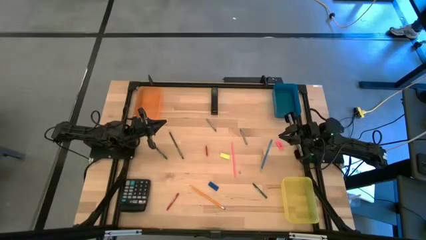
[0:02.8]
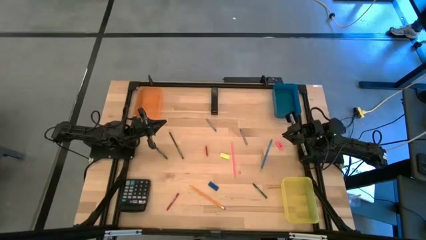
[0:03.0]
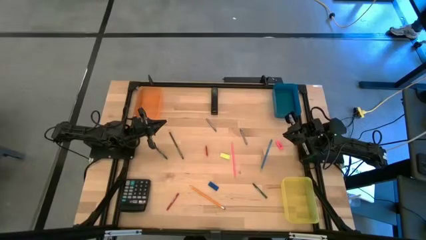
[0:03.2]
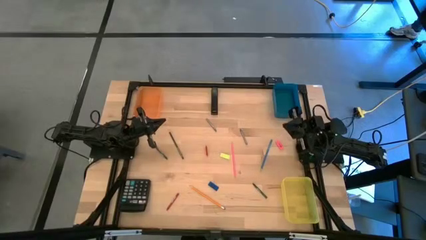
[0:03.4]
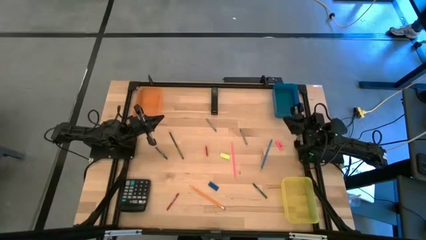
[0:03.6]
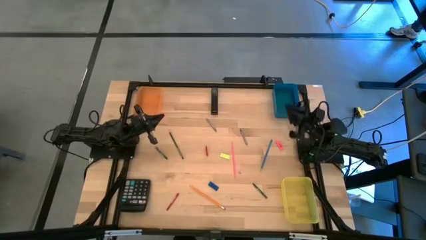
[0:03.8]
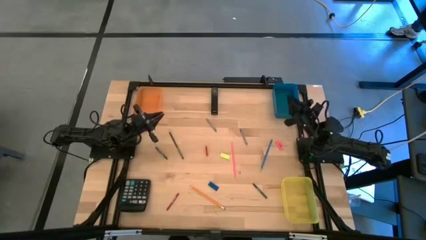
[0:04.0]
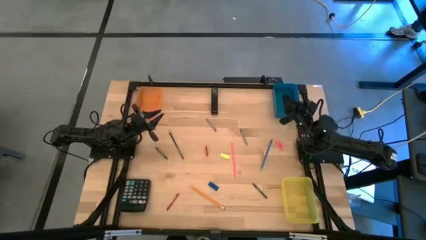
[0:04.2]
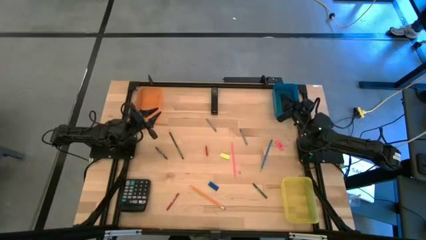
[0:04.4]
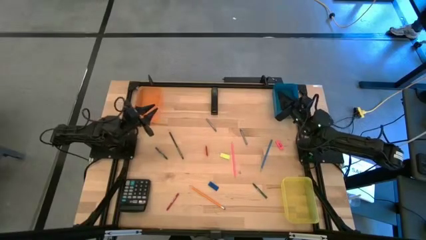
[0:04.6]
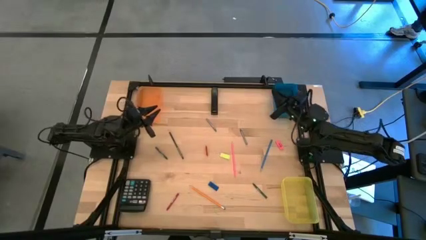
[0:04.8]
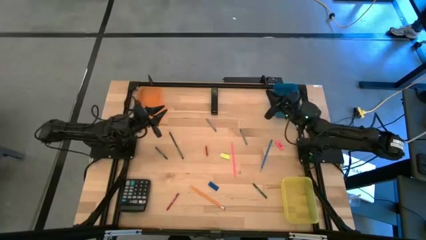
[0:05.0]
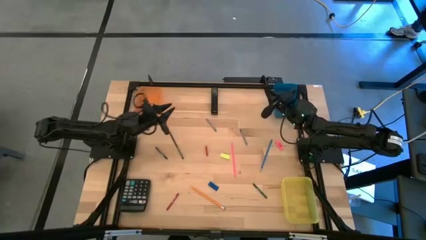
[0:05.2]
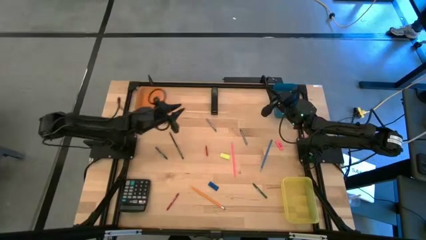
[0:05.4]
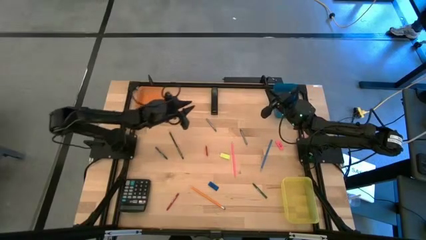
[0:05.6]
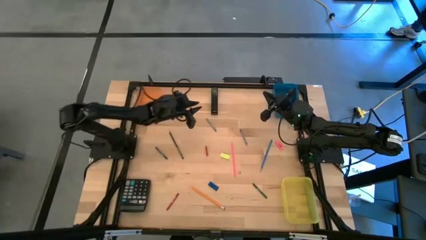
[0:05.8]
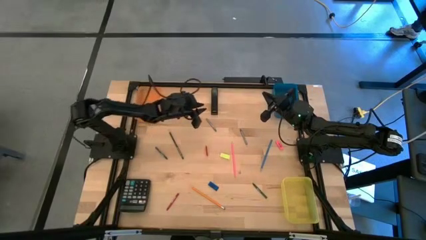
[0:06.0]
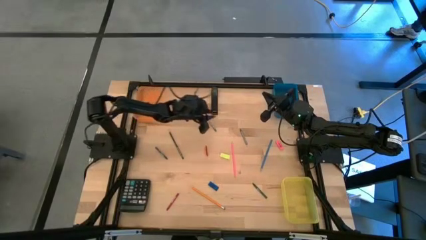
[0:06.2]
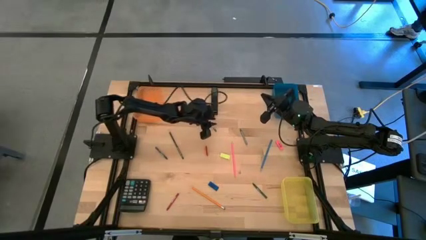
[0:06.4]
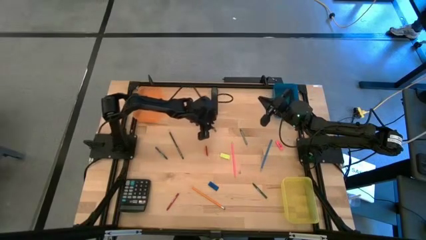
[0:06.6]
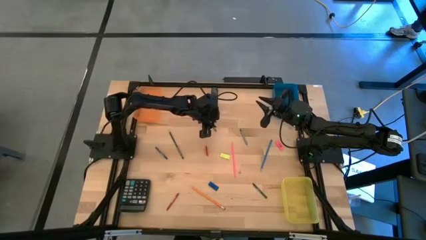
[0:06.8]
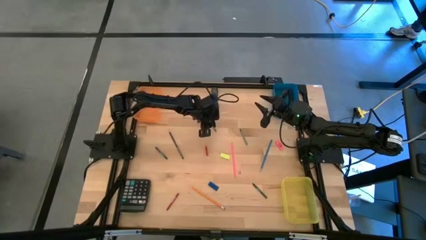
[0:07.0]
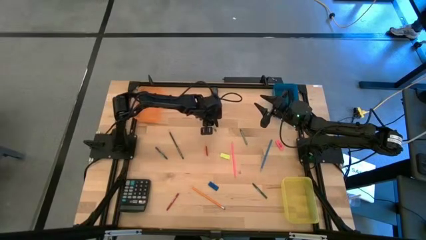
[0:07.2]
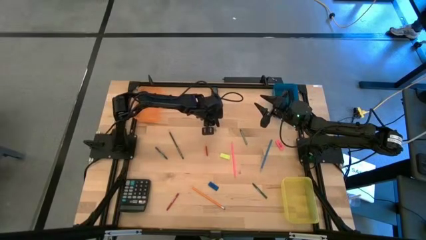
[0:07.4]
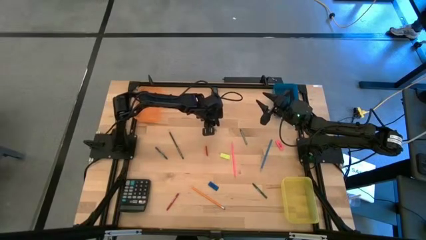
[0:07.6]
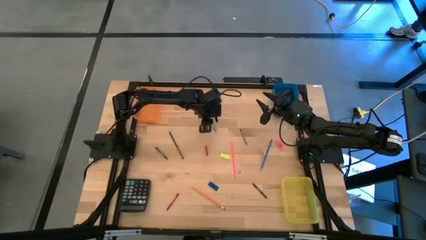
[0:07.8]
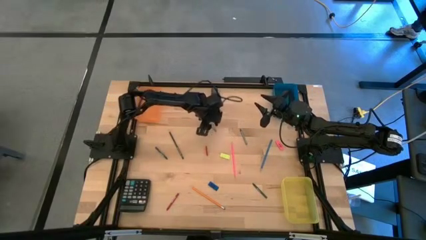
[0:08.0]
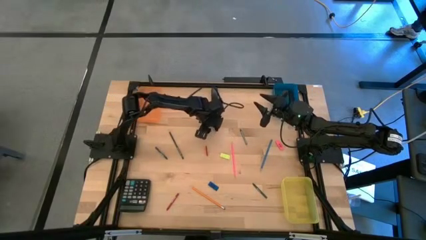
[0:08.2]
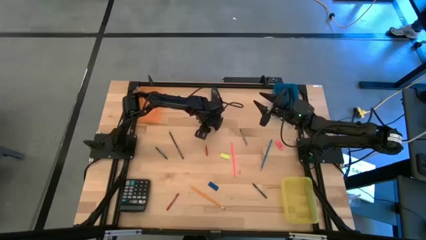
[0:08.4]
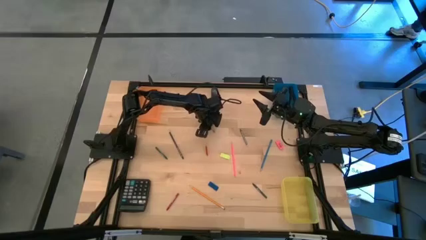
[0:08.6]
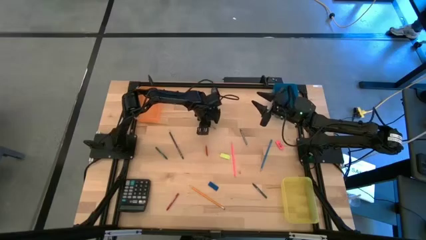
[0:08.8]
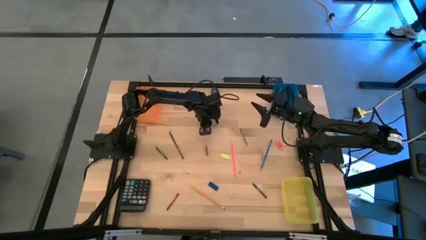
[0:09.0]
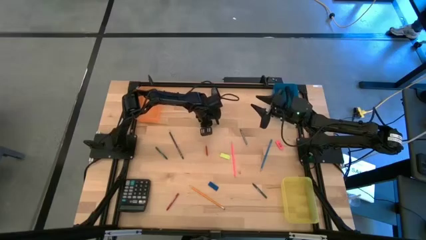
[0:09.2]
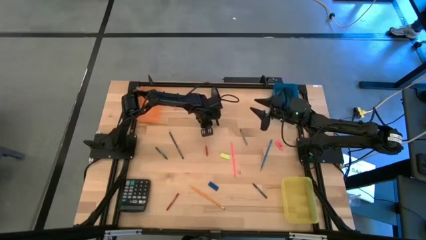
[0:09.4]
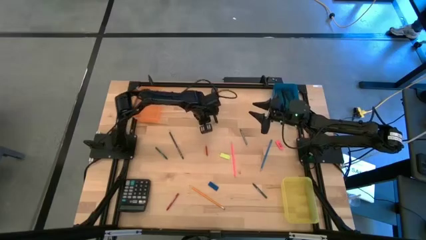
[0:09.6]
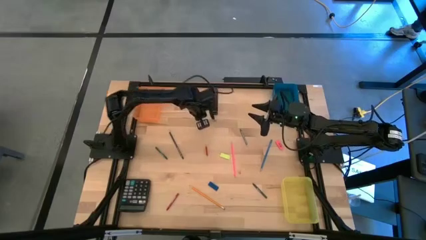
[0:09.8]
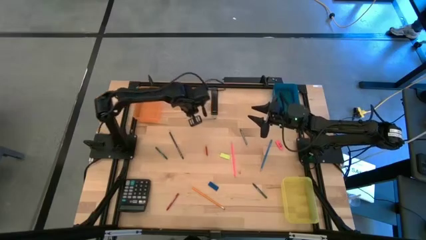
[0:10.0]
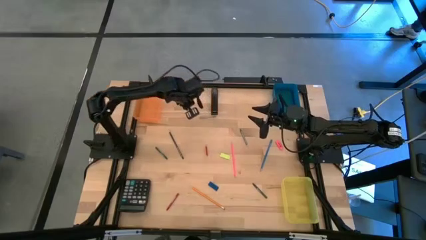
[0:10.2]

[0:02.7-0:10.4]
Task: Sort crayons/erasers/pens/pencils in bins
Put the left gray crayon into the orange bin

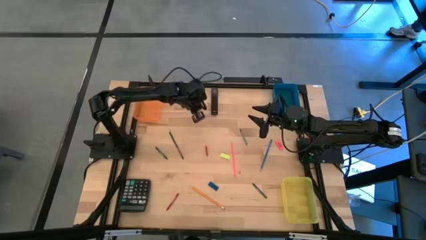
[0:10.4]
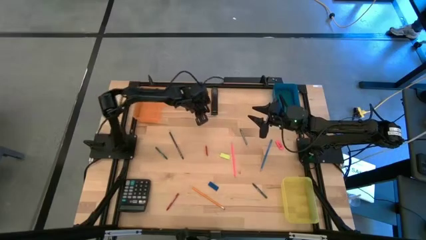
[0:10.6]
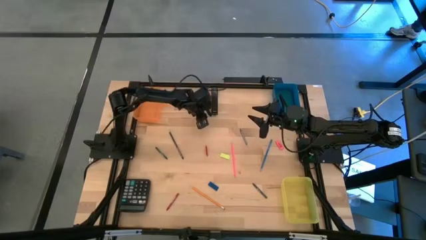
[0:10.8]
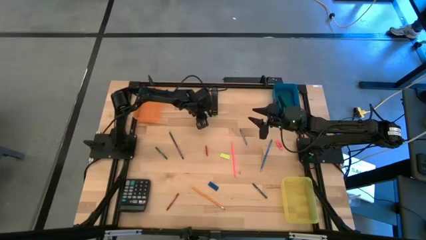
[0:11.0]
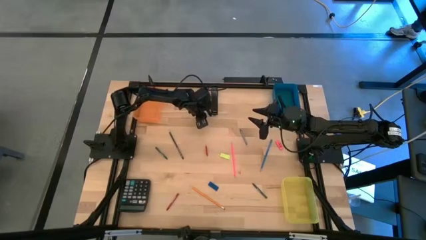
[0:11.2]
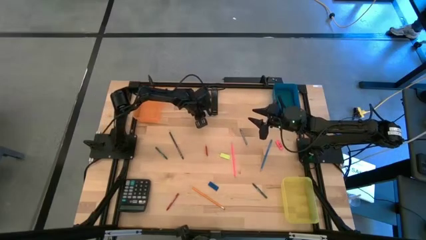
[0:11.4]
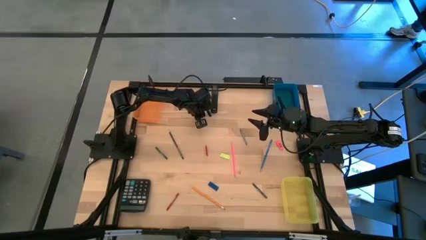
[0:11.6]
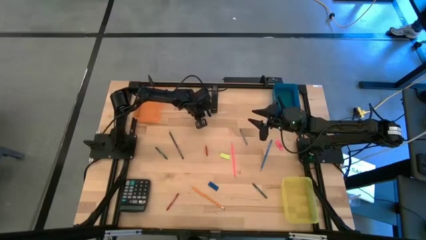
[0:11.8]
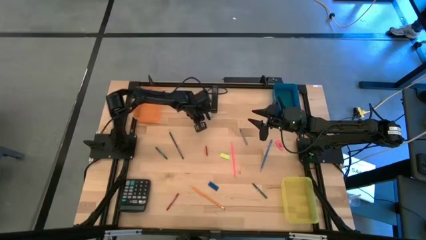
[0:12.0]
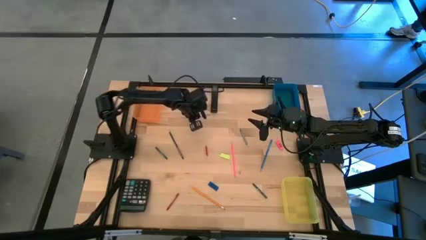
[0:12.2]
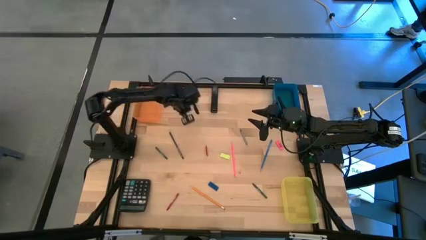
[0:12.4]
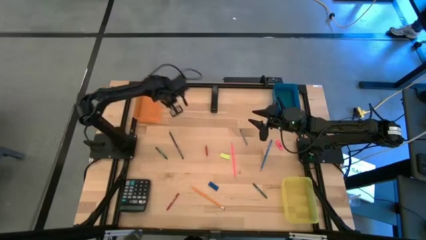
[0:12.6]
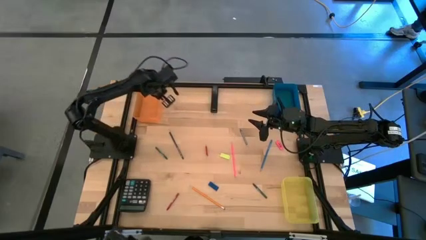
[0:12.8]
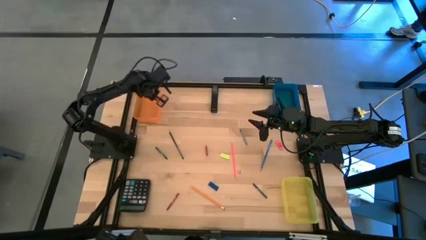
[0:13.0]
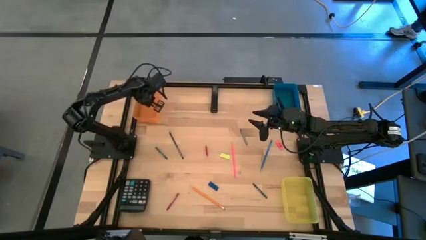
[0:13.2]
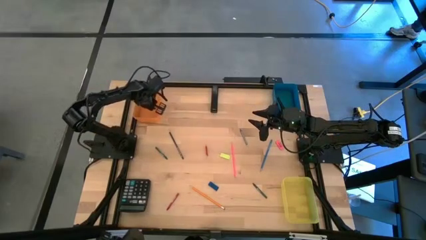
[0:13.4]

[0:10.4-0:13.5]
Put the left gray crayon into the orange bin

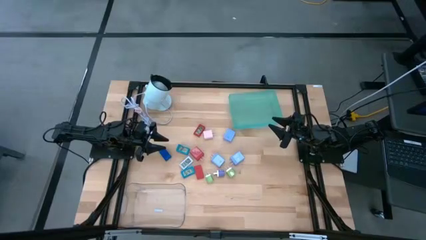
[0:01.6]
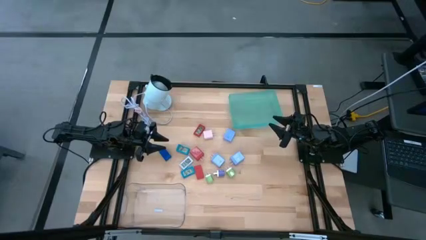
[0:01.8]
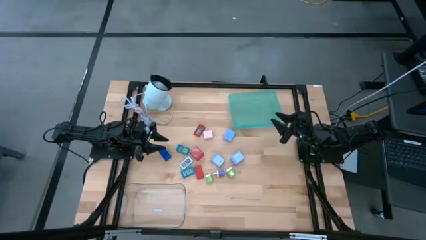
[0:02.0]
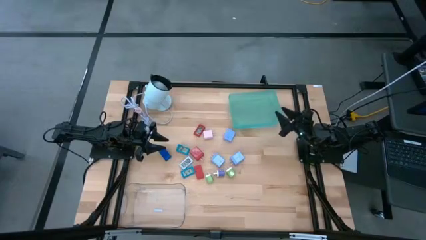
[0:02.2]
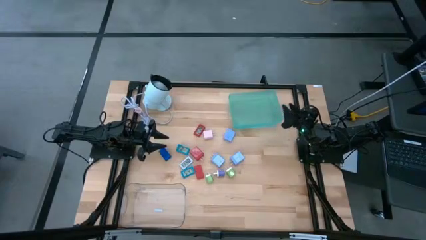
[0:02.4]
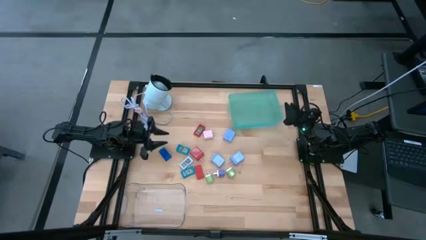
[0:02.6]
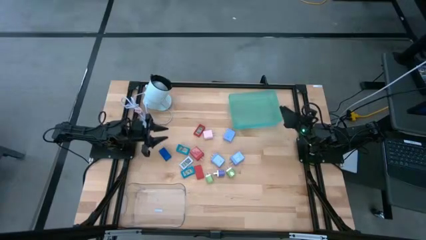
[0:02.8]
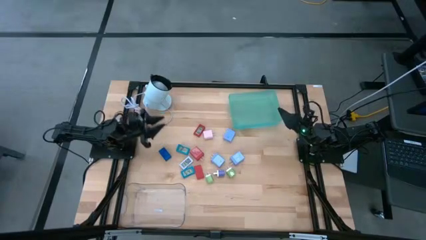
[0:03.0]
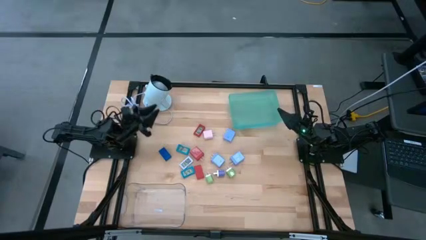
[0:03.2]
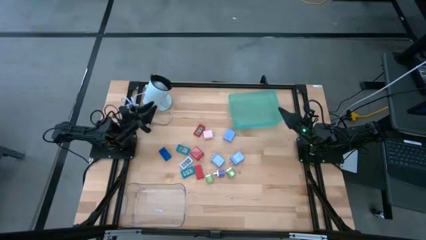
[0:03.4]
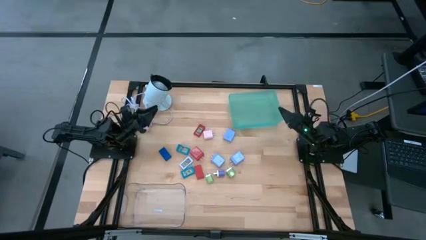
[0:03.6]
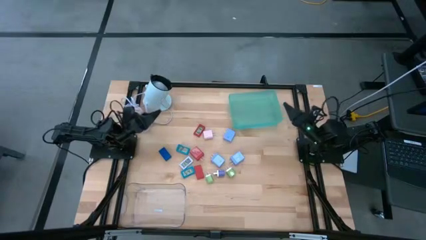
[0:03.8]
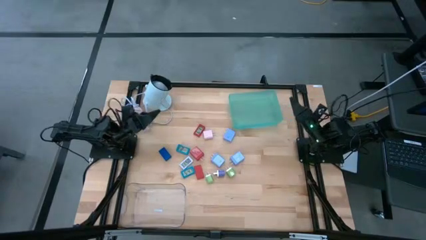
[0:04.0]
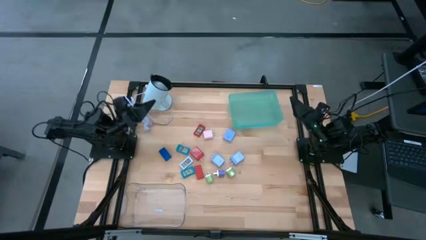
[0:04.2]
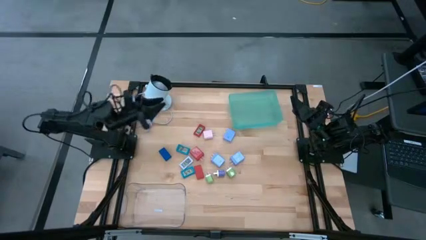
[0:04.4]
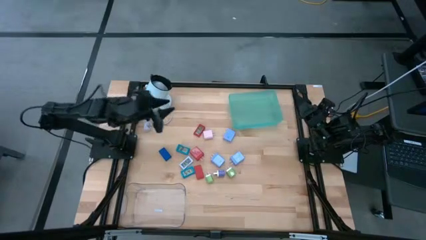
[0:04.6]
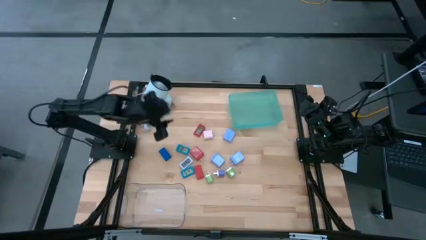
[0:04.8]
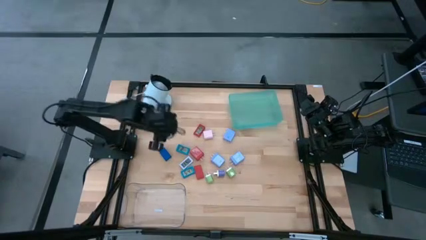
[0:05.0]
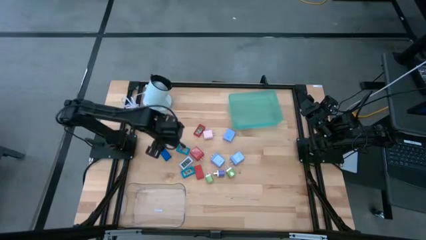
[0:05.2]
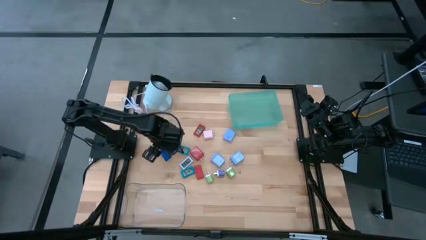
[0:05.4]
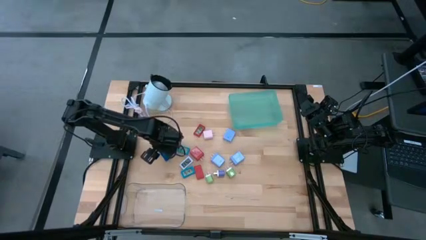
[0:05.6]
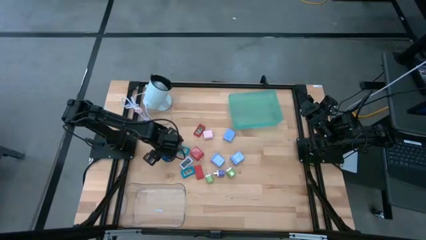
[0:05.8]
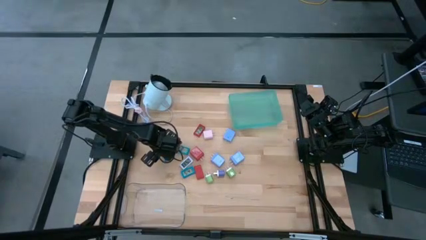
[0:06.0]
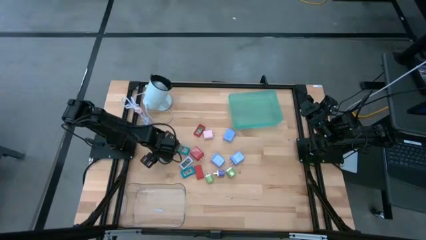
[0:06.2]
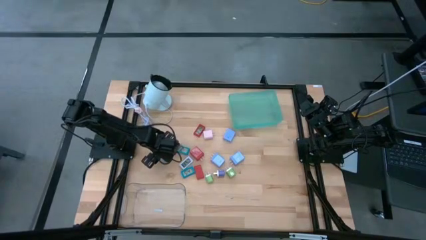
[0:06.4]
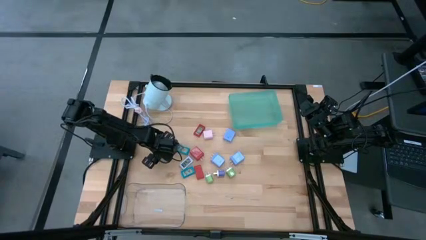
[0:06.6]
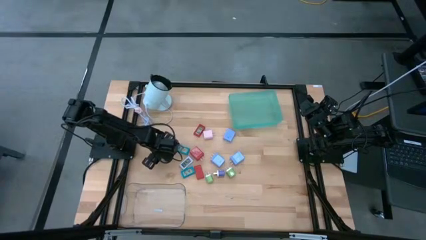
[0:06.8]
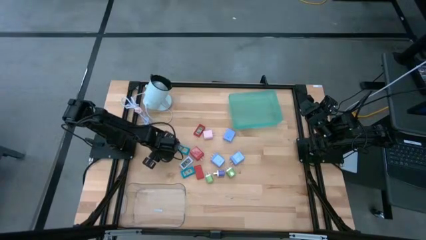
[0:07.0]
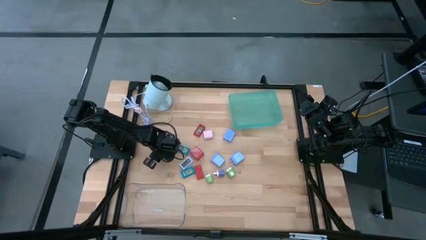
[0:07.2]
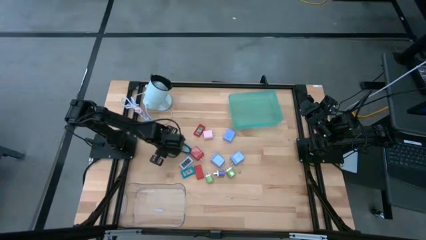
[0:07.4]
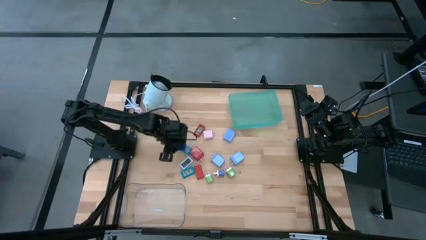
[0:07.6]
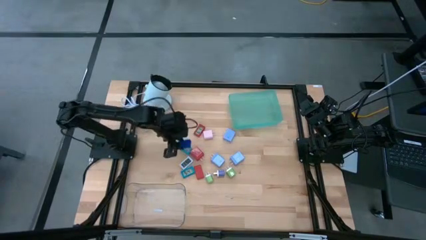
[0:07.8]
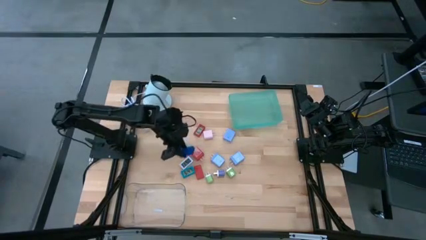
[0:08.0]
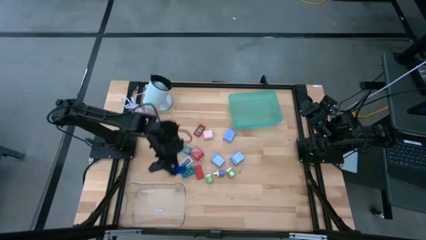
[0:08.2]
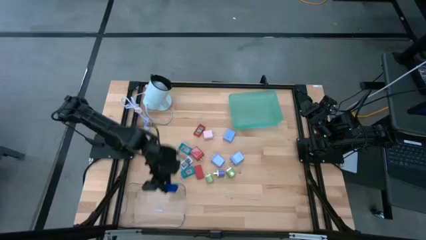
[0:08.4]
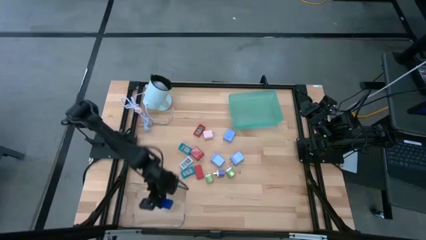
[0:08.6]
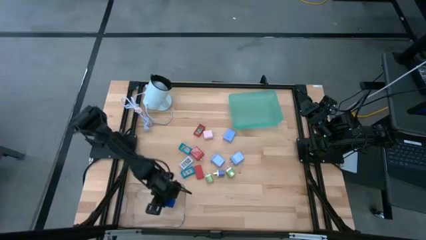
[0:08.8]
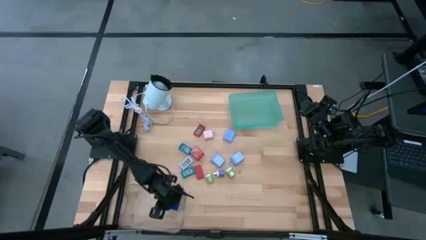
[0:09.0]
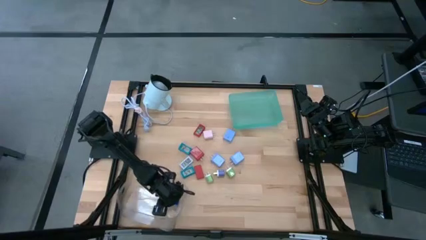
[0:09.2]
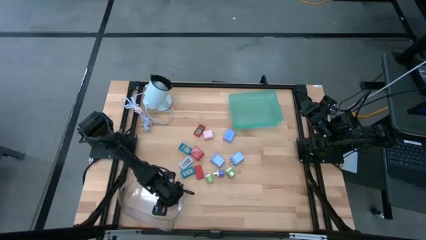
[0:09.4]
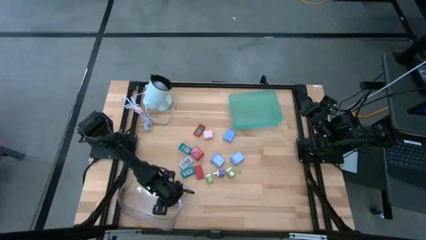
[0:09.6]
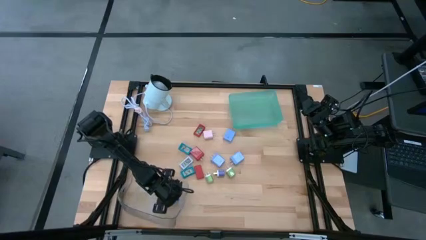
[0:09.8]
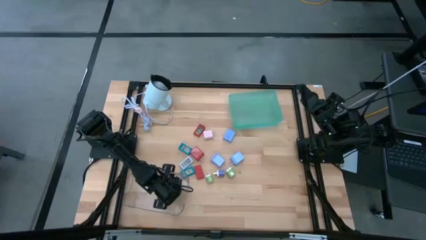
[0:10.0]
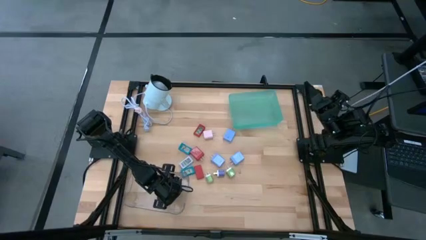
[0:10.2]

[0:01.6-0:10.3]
Task: Pick & Place Office items
Put the blue digital clock into the transparent bin
